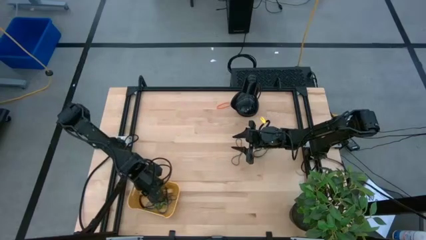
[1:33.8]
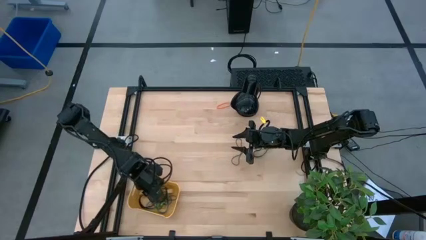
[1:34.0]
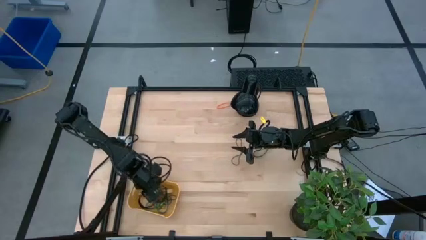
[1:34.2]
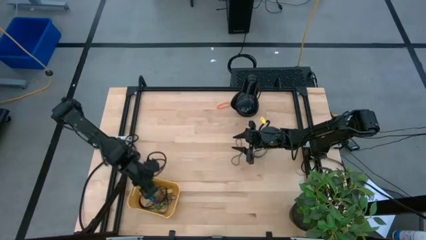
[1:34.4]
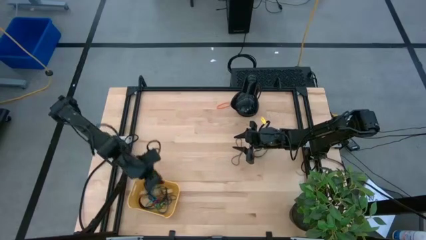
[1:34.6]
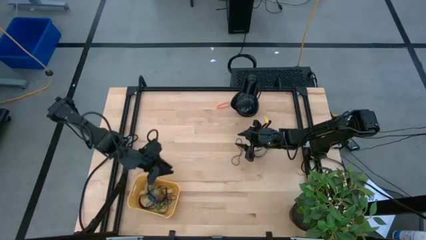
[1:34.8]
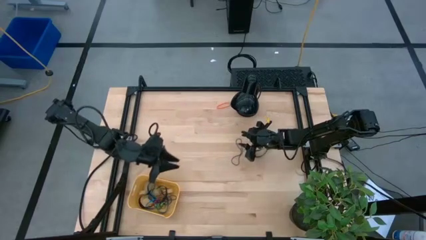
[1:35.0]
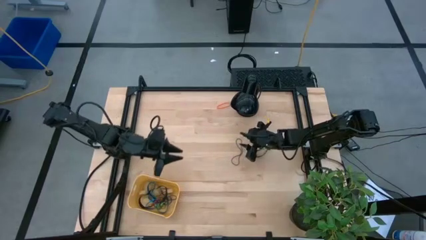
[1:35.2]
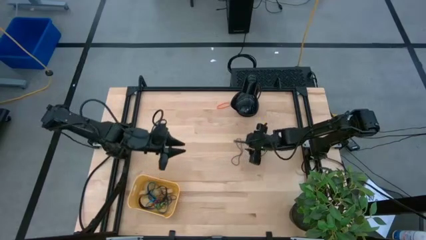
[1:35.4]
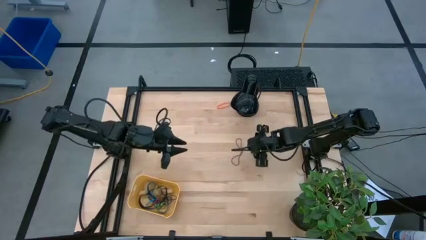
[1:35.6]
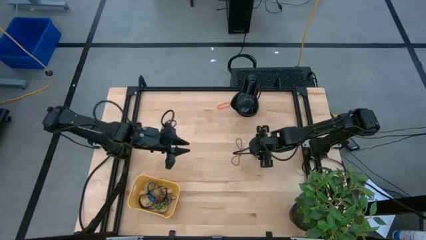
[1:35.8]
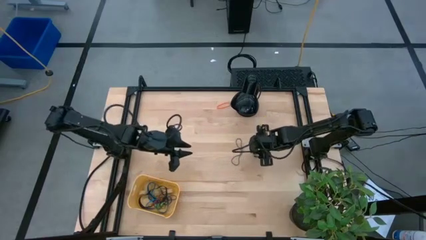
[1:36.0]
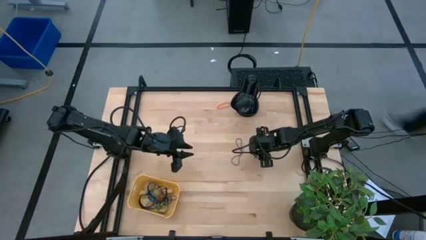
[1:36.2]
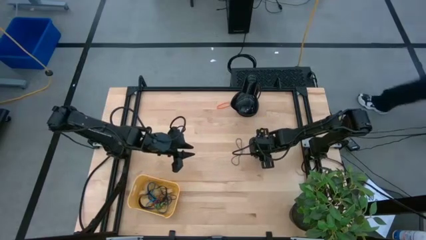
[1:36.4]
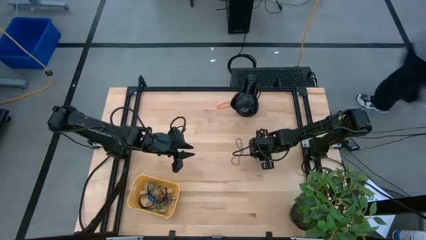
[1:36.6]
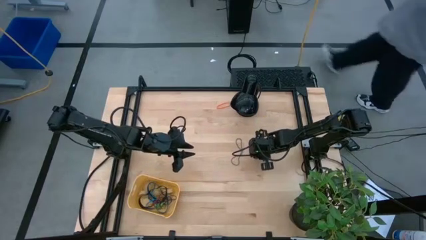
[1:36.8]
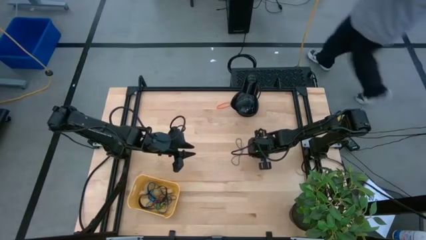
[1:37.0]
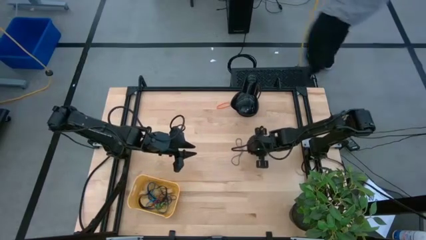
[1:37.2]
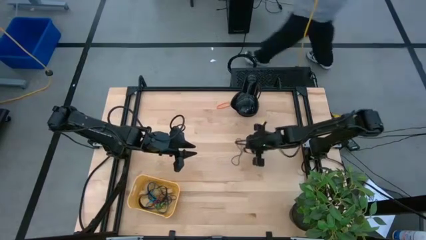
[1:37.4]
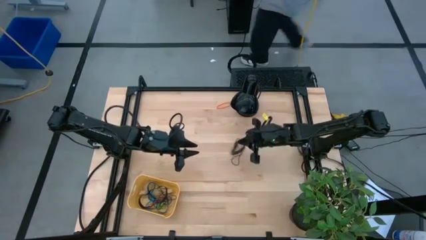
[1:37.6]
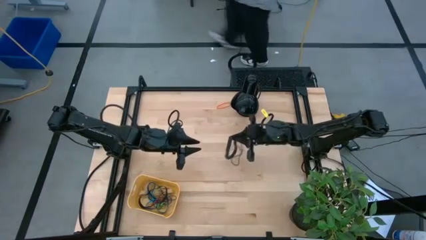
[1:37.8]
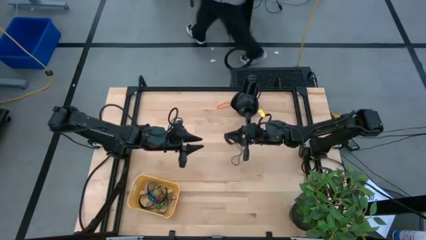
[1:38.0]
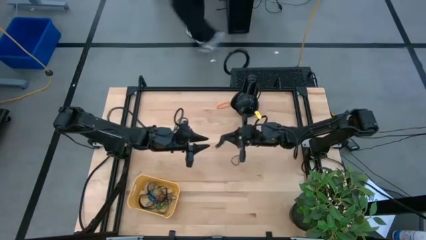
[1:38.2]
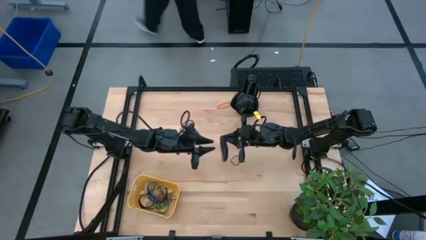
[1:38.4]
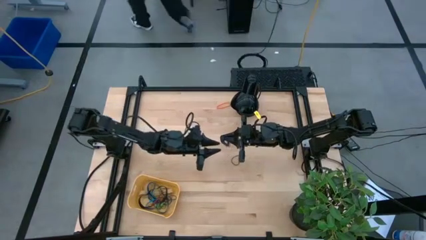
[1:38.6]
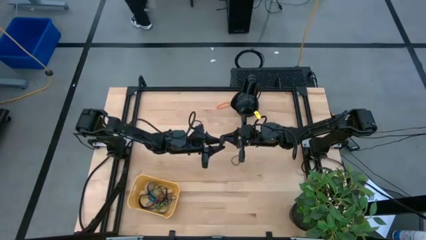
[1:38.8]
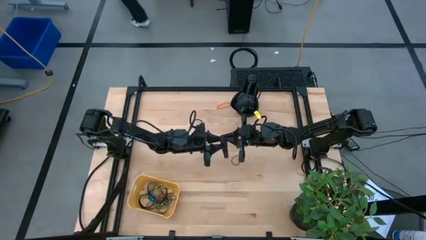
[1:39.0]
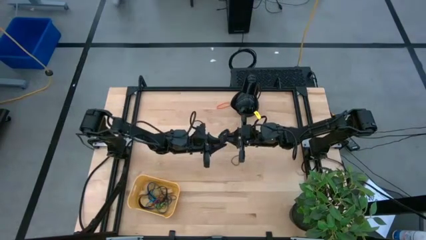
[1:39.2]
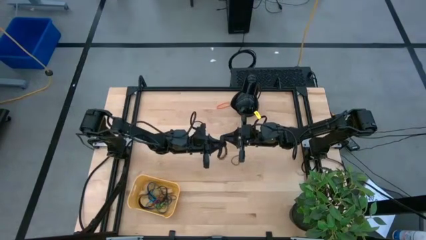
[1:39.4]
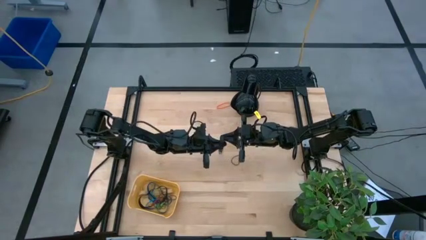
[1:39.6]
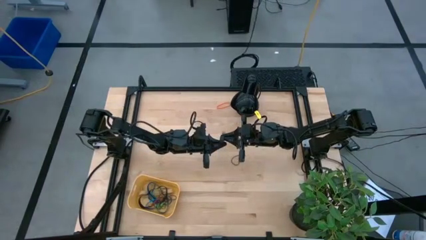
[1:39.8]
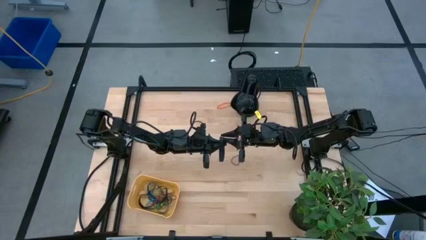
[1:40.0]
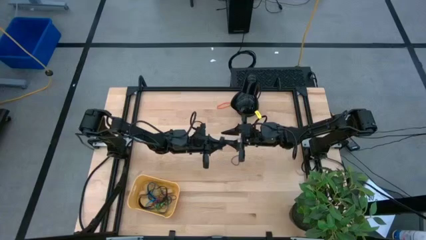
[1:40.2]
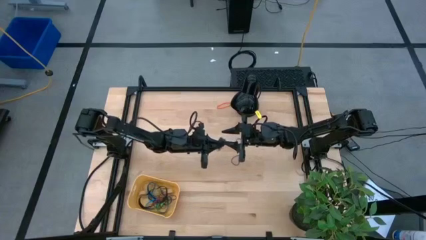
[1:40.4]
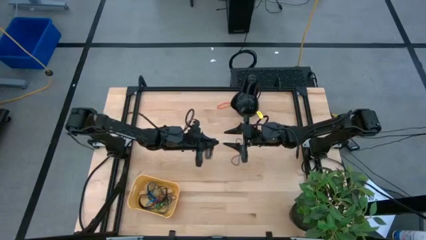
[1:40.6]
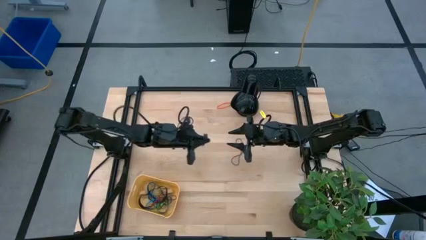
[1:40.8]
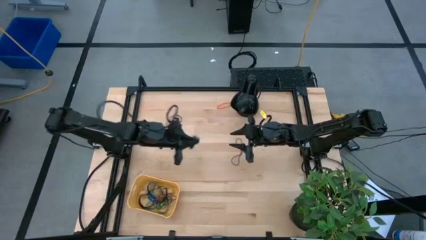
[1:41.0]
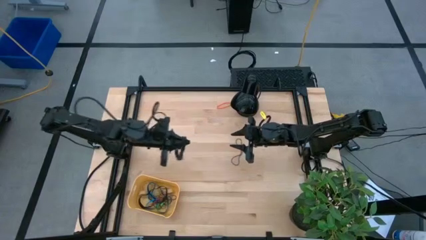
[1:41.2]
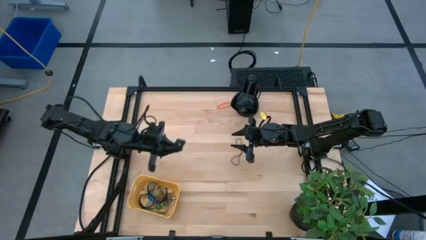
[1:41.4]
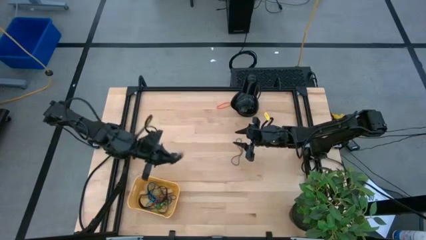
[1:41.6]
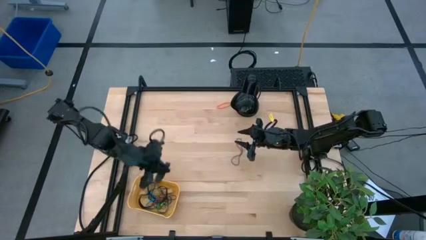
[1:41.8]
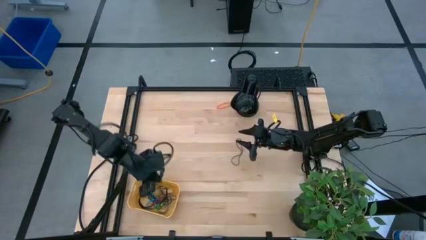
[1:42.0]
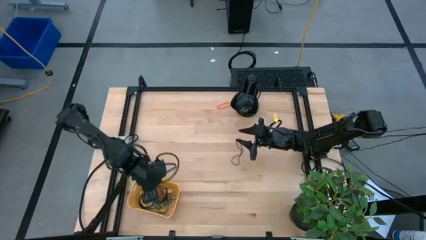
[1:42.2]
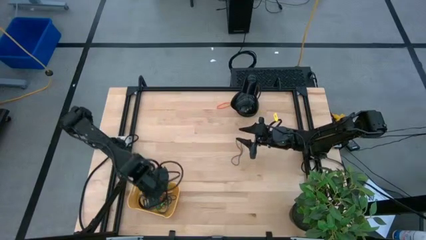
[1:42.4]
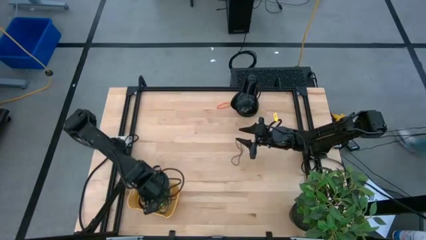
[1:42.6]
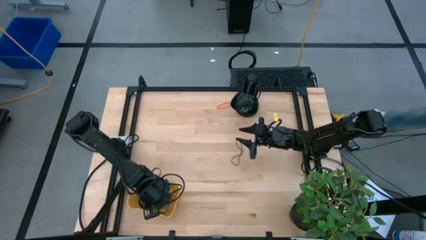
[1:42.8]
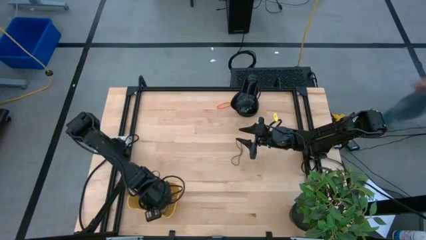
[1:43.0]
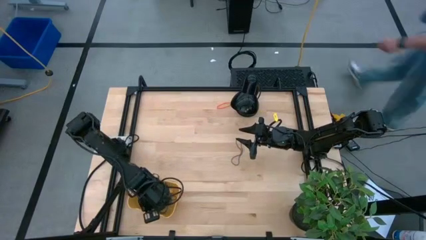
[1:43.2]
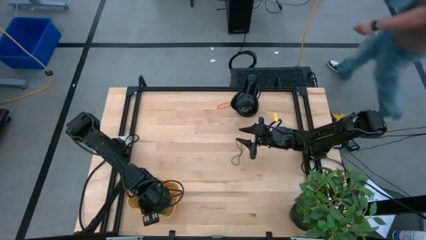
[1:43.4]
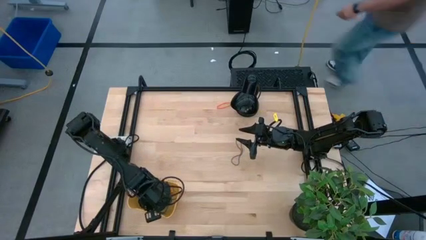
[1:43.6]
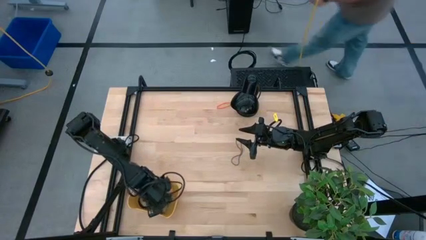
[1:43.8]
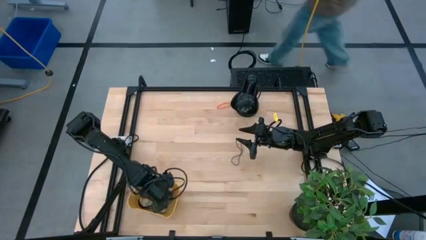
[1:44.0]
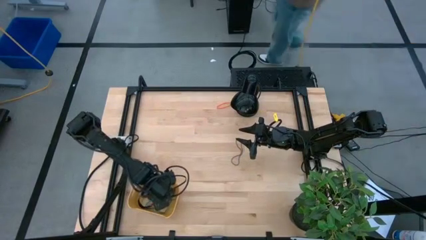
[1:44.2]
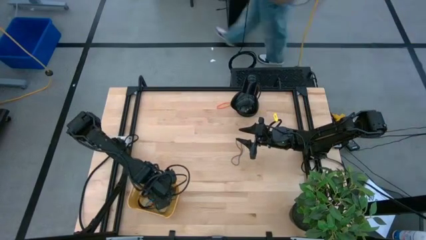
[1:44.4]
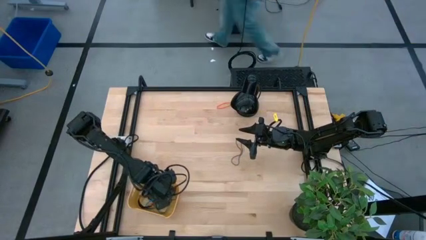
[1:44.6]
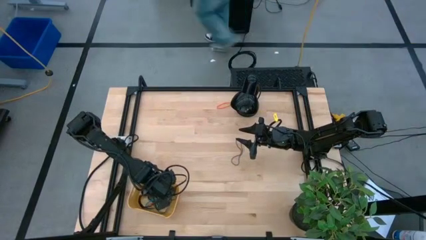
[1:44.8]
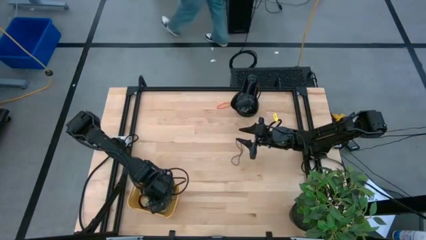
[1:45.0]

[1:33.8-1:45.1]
Task: Pick and place rubber bands into bin
Put the black rubberband into the yellow bin

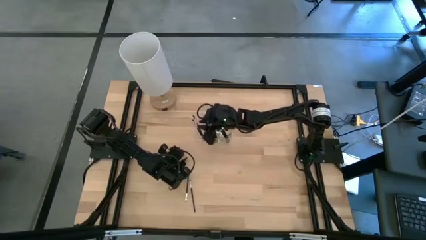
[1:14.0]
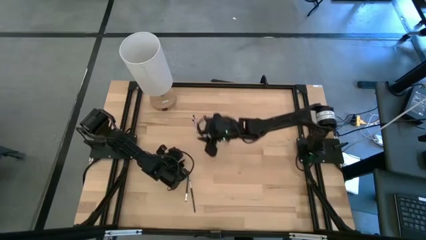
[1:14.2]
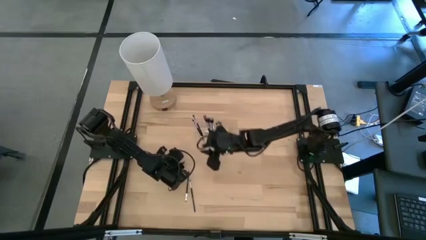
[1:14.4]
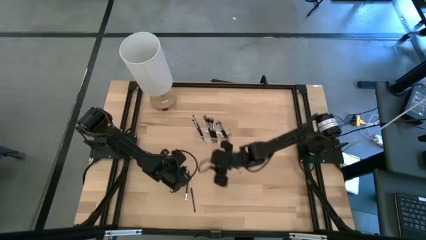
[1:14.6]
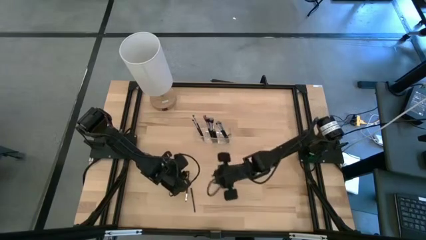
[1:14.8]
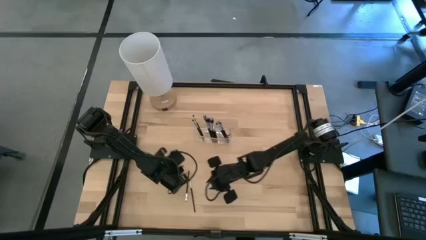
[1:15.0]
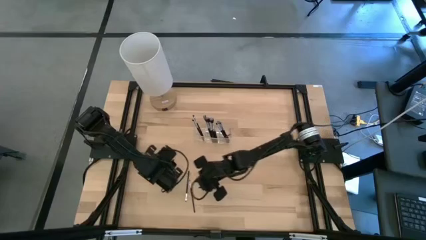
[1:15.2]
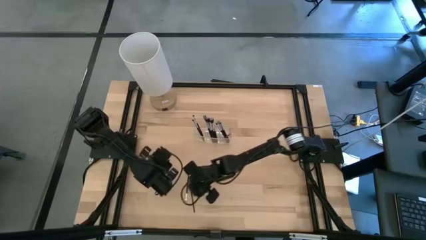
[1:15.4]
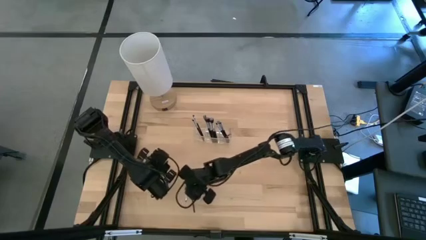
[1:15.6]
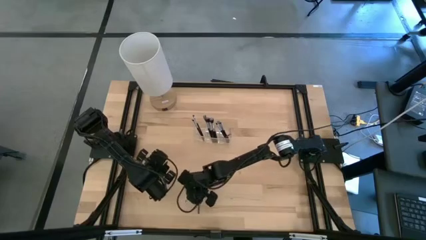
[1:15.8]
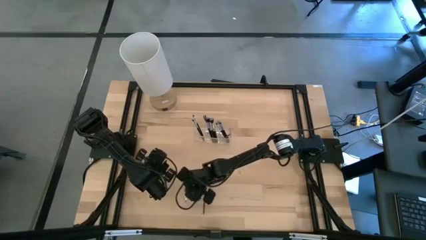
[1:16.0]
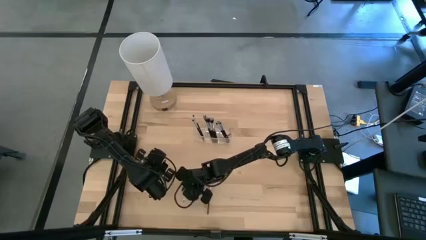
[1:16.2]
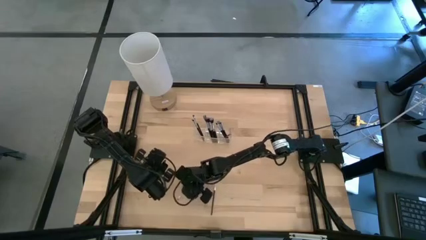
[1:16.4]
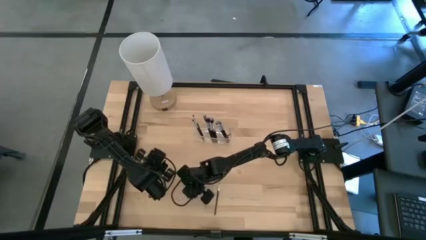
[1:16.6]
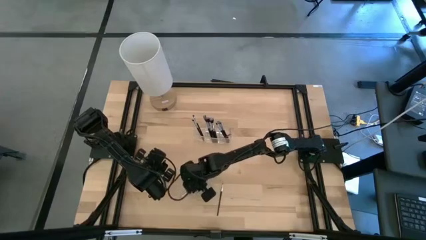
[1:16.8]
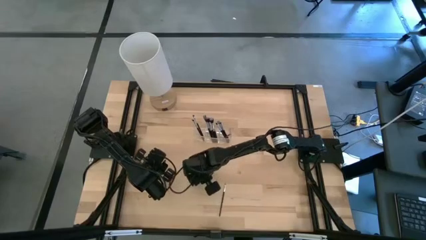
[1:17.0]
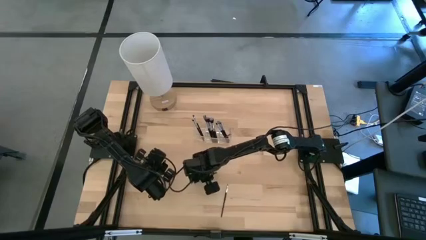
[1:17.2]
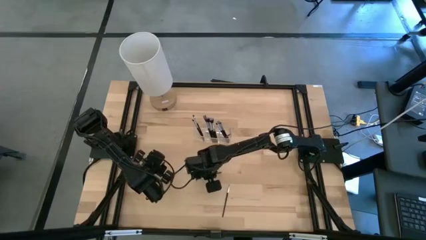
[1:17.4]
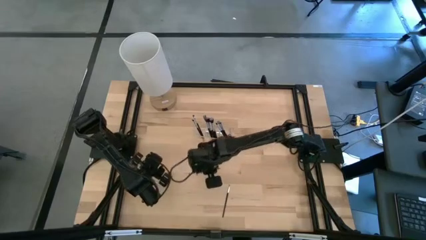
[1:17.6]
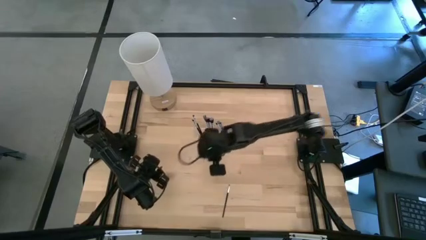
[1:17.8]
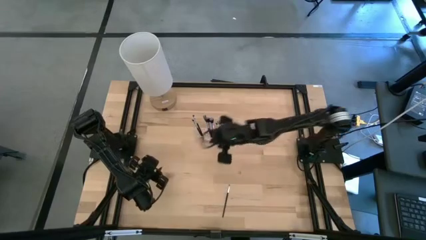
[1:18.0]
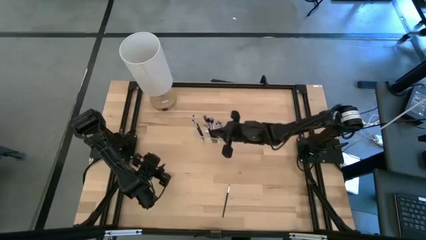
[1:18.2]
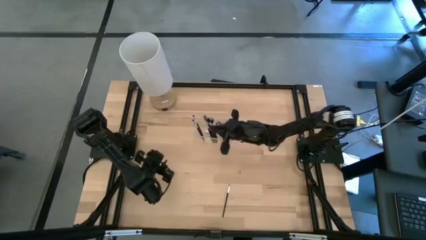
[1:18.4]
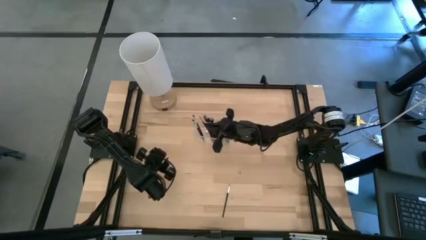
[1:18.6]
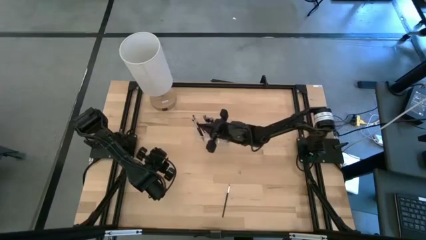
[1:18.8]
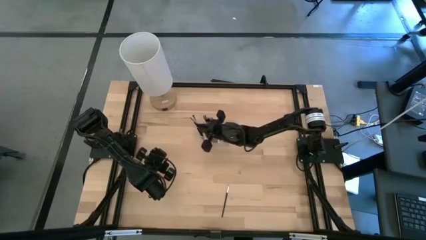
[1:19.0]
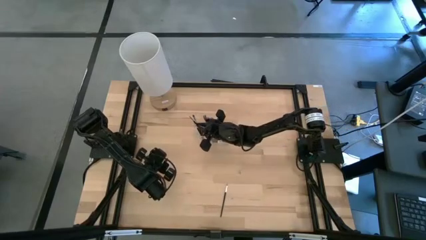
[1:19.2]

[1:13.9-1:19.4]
Task: Put items in baskets/containers
Put the black eyeshadow brush into the transparent organizer
